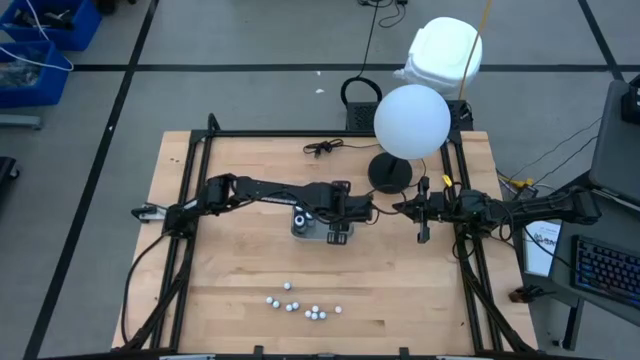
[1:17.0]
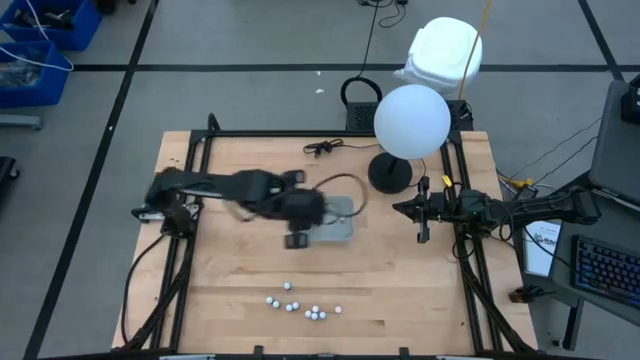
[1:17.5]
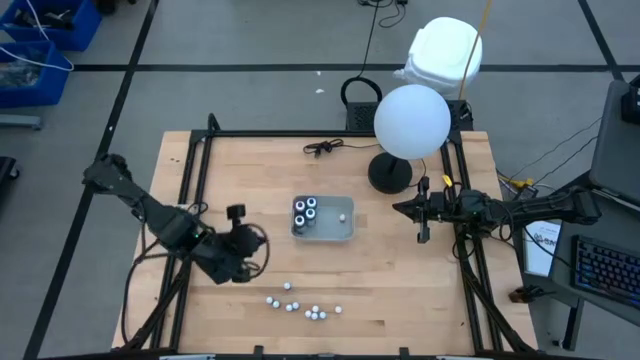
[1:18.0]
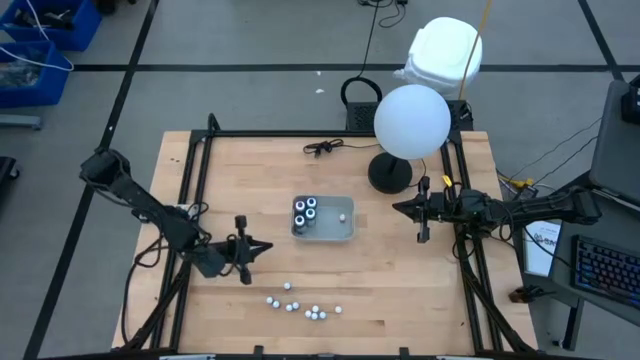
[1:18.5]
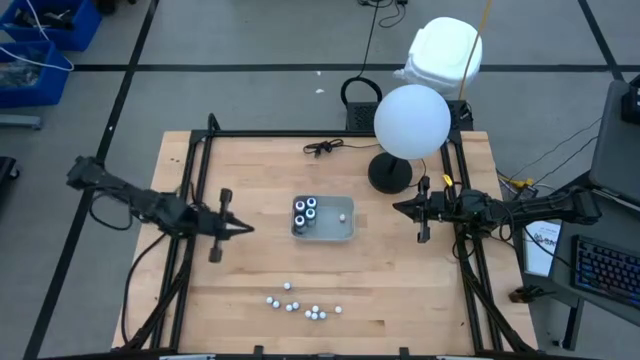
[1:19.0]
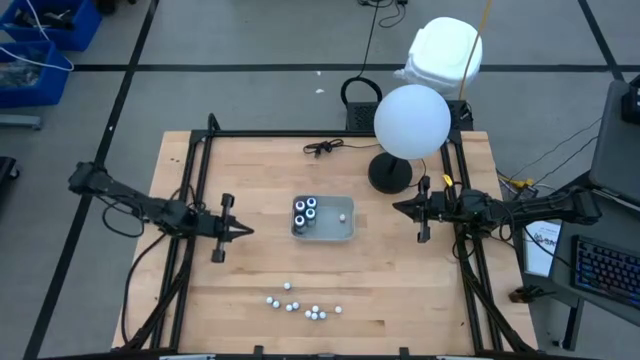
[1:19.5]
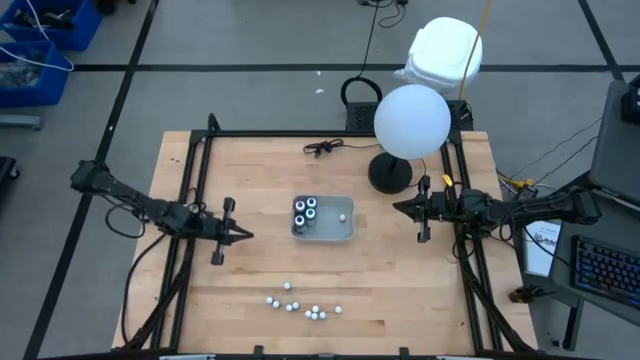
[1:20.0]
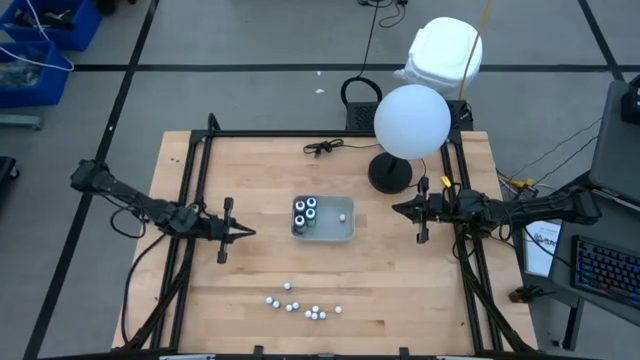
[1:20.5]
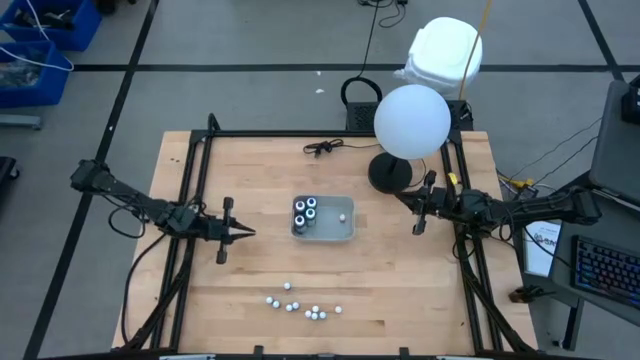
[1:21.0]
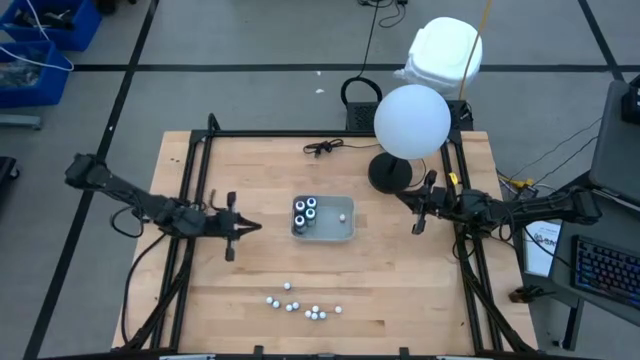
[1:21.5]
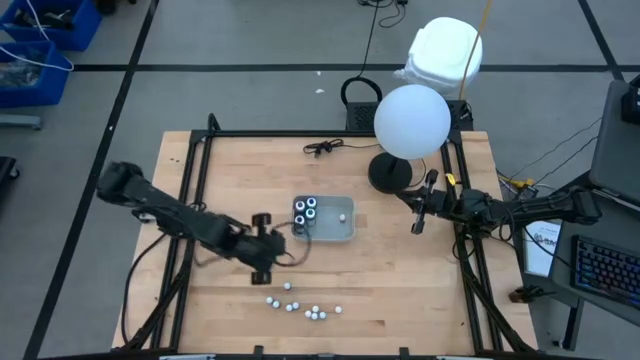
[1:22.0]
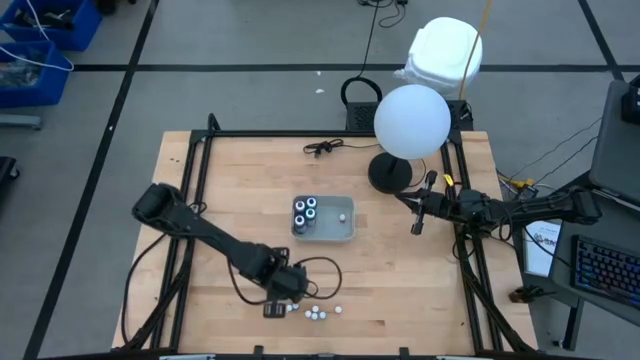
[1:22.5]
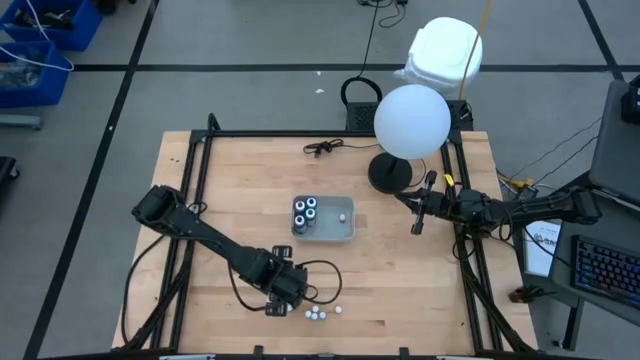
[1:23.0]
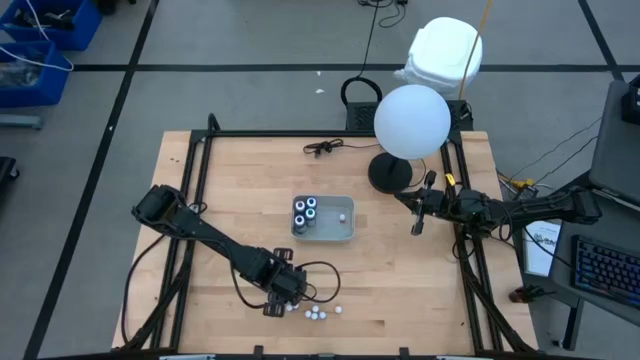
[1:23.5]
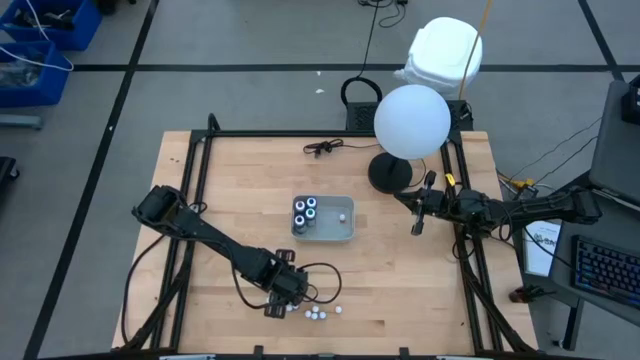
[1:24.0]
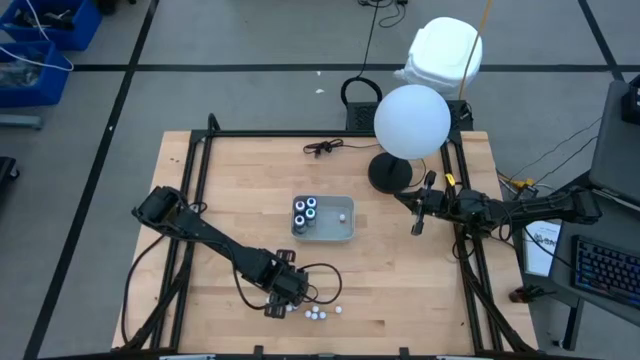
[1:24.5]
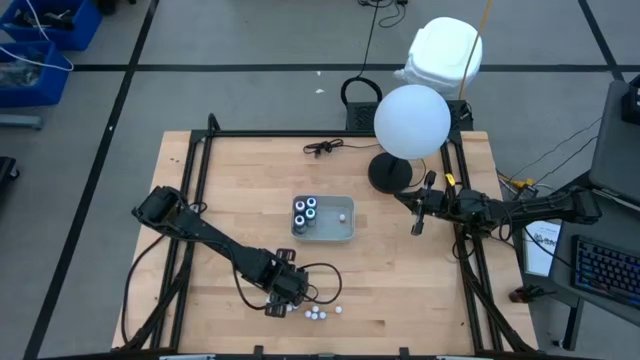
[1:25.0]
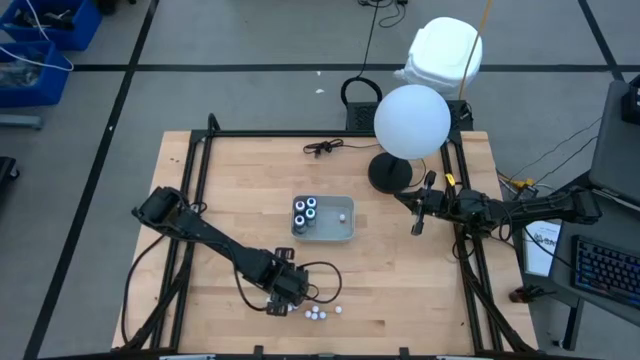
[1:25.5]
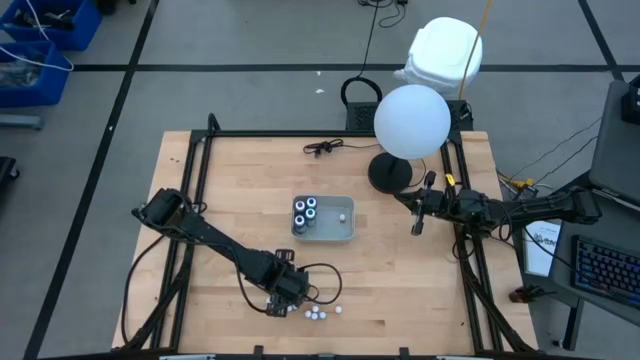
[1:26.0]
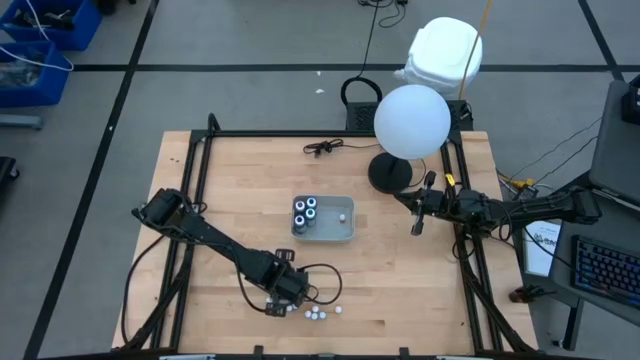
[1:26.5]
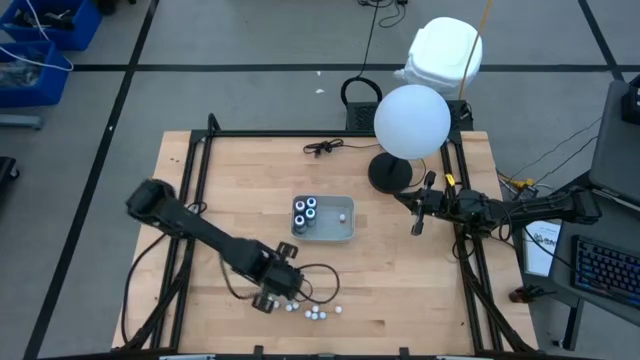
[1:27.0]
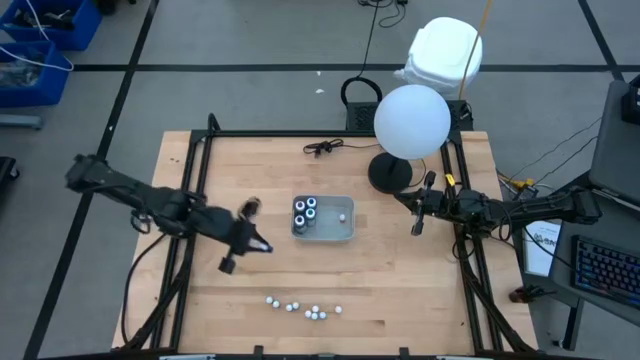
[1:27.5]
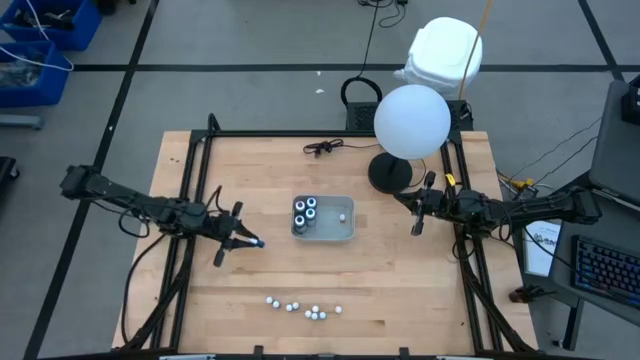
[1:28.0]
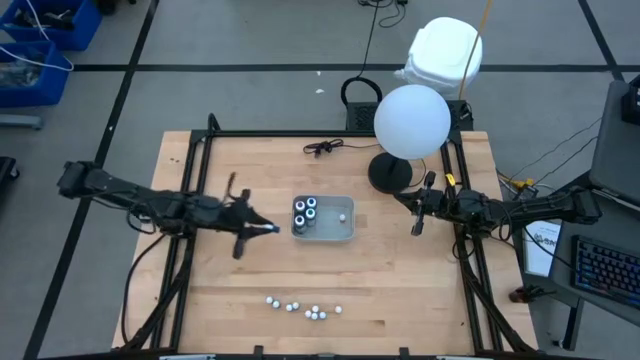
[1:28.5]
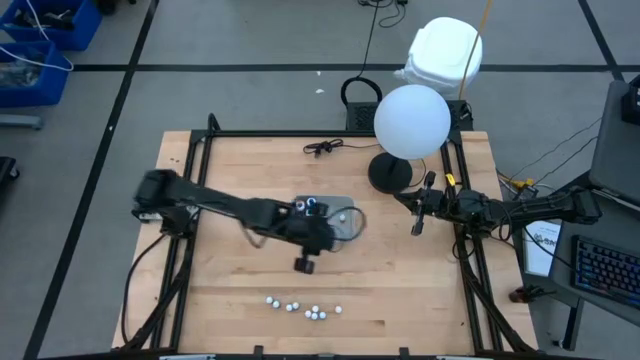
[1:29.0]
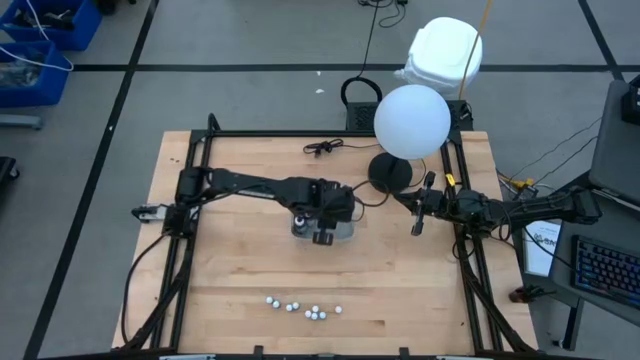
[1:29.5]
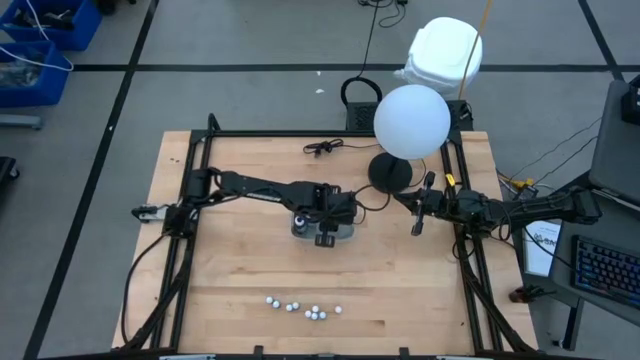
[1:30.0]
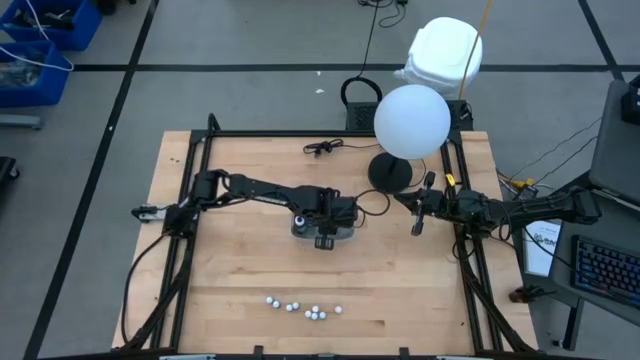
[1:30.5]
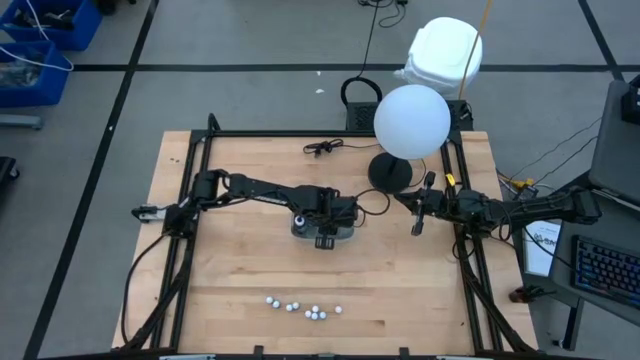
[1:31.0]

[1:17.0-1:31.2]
Task: Pick & Place food coloring
Put the top small blue food coloring bottle into the gray bin

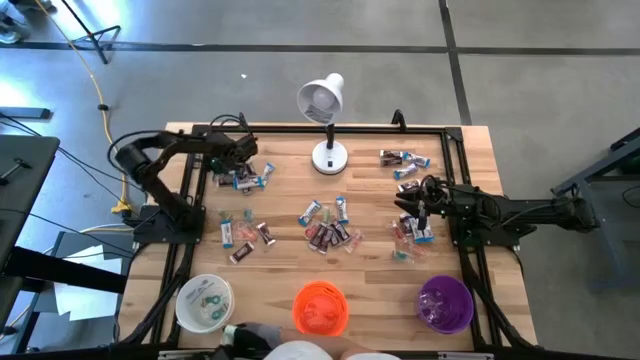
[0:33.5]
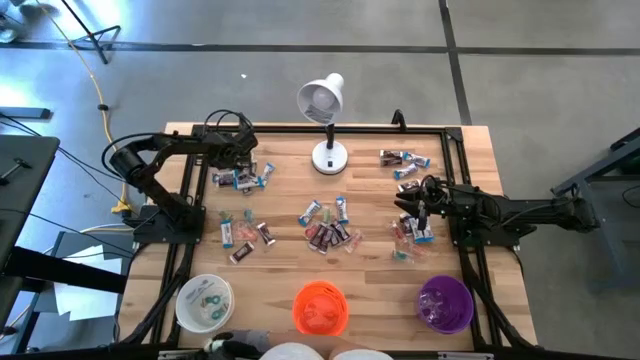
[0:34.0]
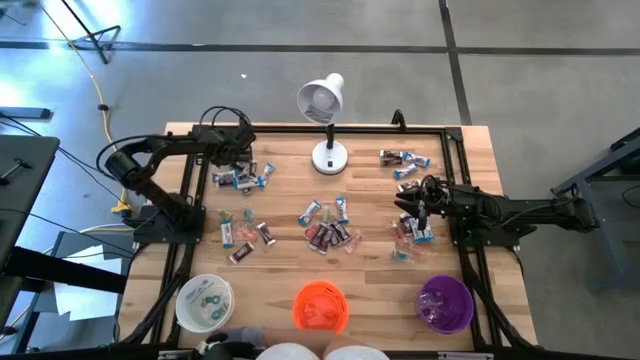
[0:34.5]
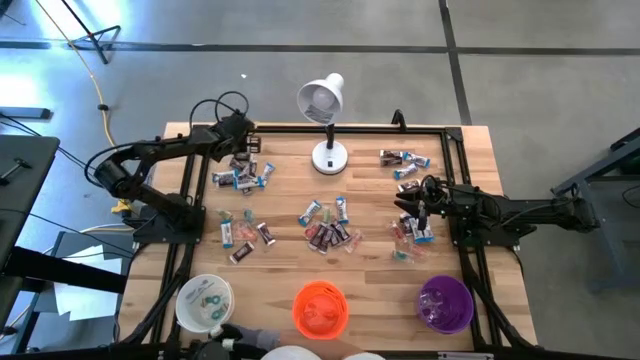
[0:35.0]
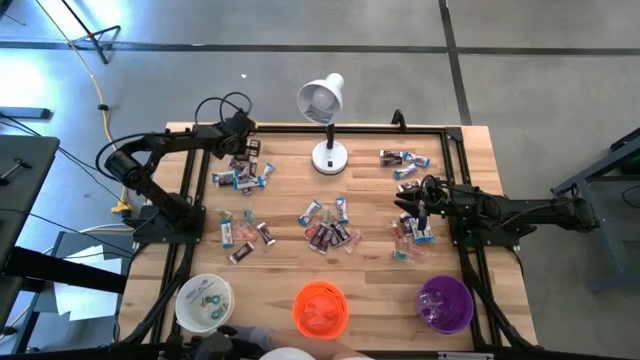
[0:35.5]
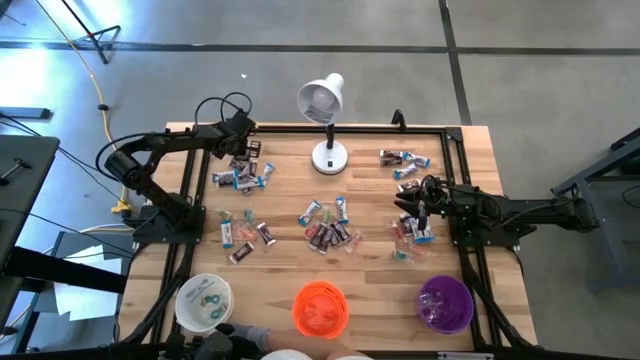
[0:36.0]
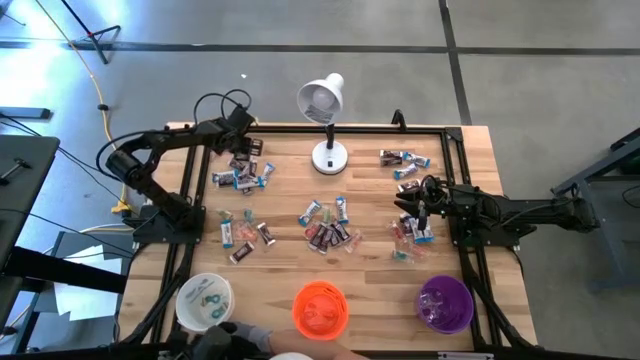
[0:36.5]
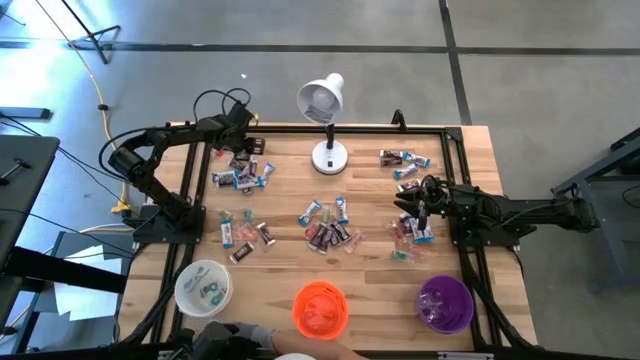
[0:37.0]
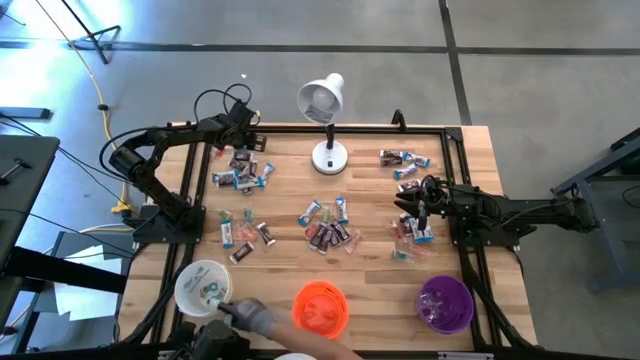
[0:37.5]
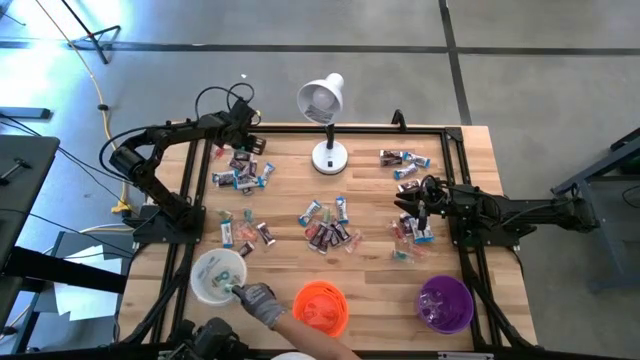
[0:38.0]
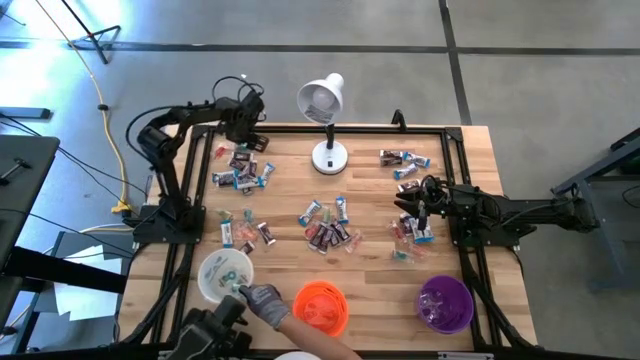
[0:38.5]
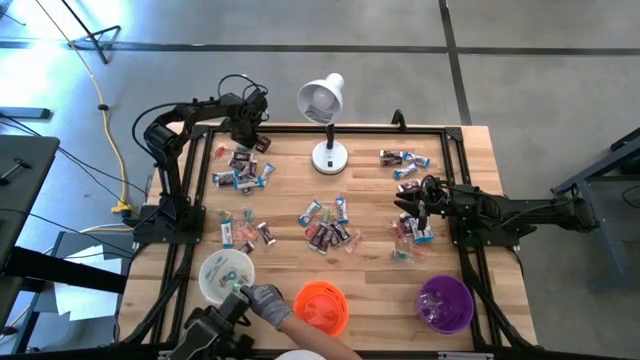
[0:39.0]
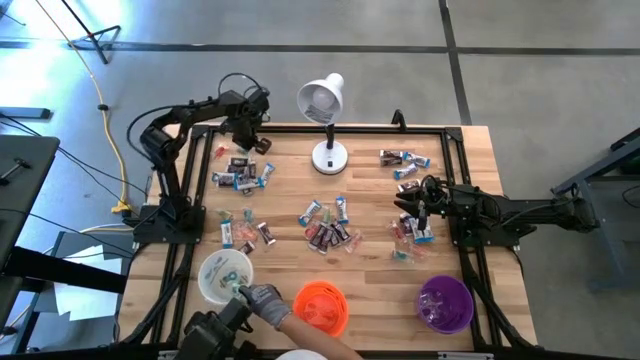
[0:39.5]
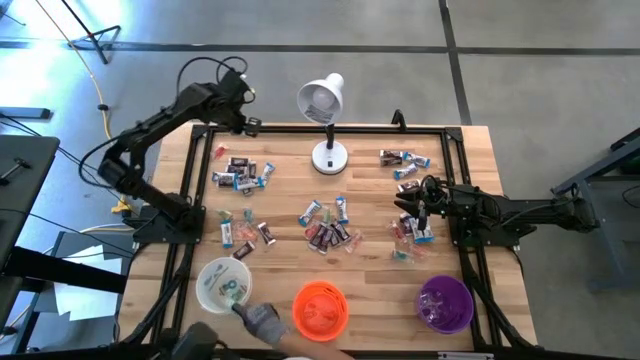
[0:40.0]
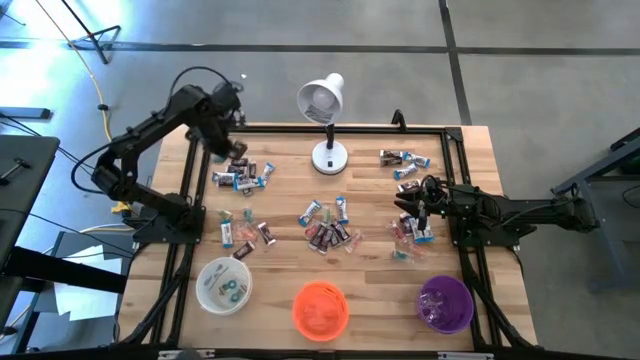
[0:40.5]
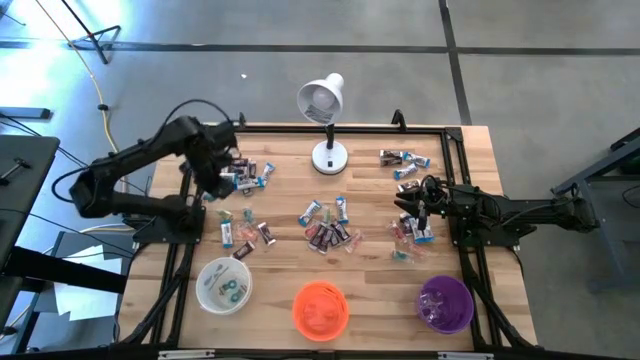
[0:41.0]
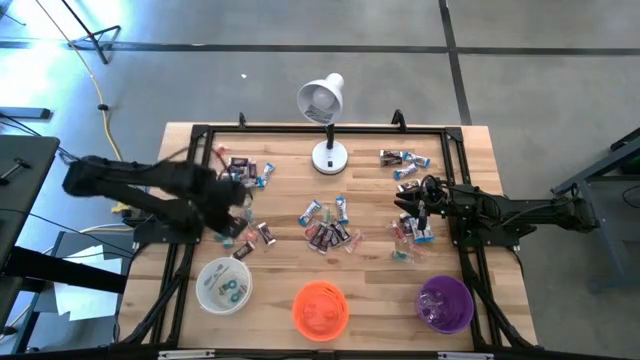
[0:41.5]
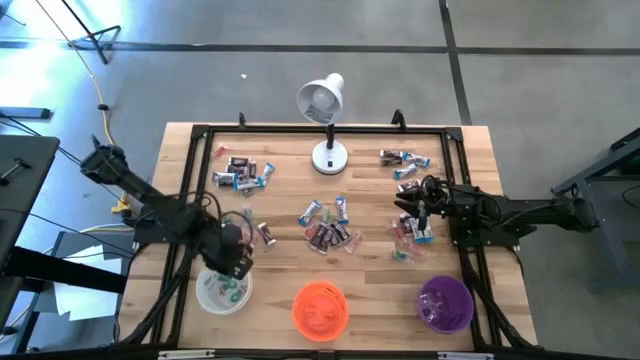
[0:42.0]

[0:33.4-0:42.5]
Task: Organize candy in baskets
Put the blue gummy into the white bucket
